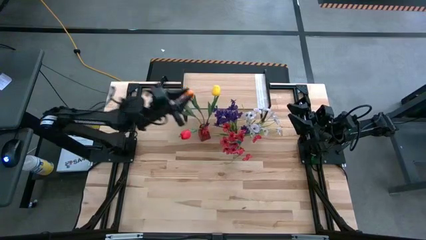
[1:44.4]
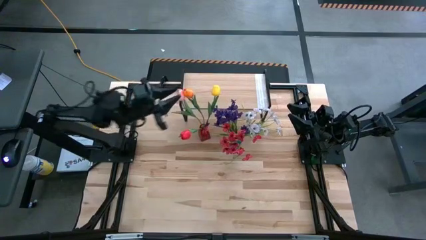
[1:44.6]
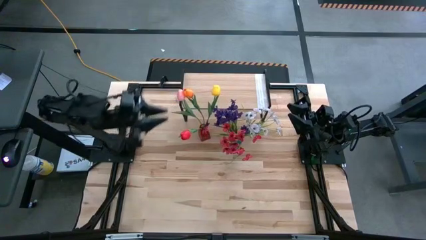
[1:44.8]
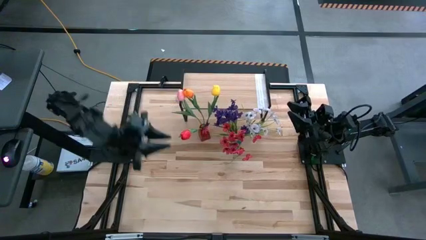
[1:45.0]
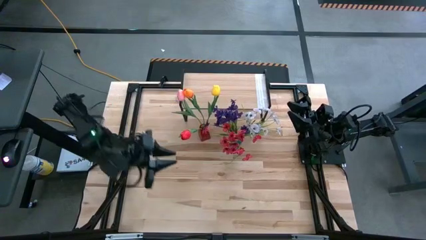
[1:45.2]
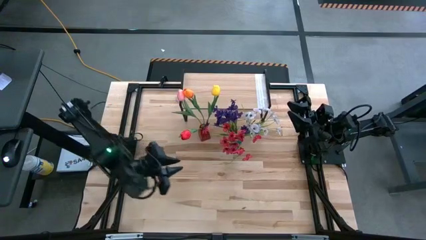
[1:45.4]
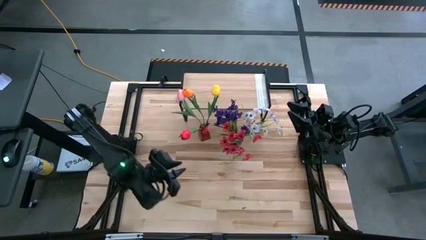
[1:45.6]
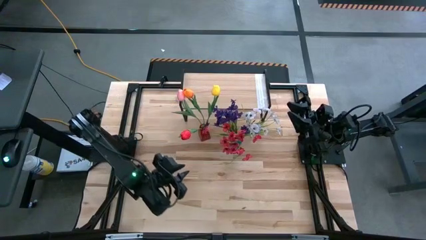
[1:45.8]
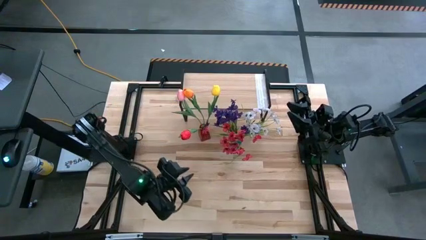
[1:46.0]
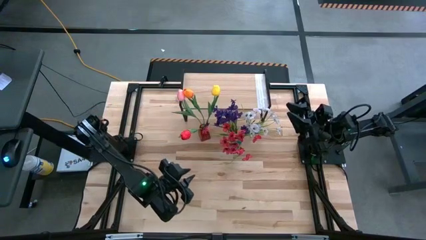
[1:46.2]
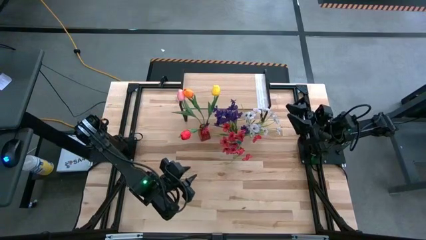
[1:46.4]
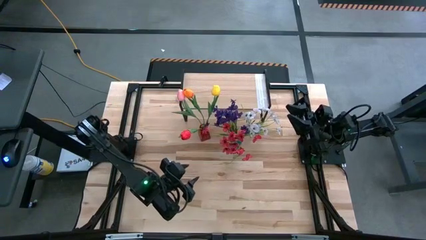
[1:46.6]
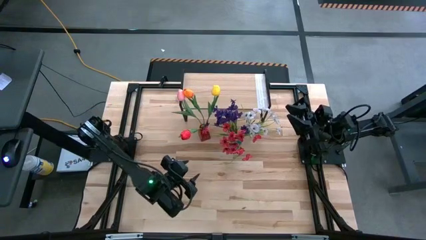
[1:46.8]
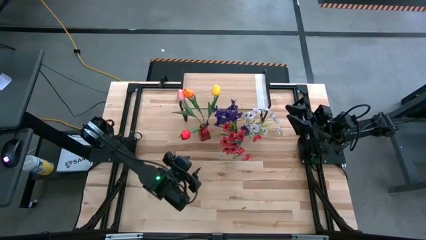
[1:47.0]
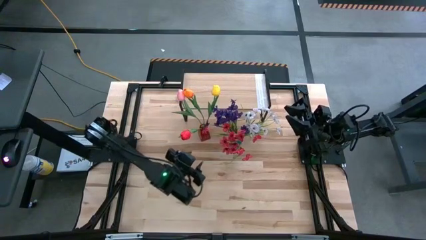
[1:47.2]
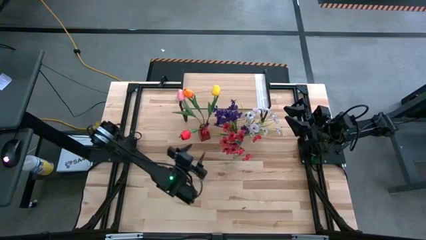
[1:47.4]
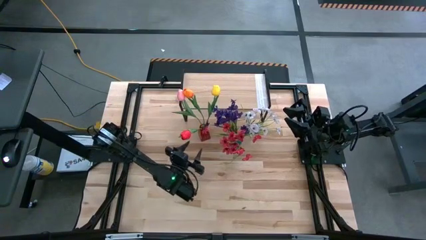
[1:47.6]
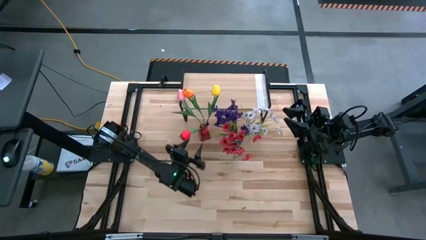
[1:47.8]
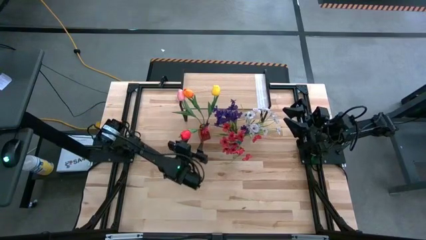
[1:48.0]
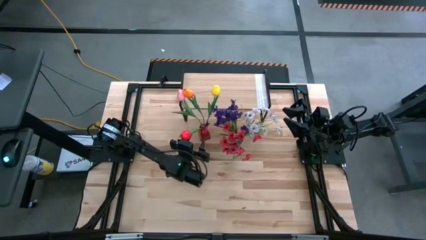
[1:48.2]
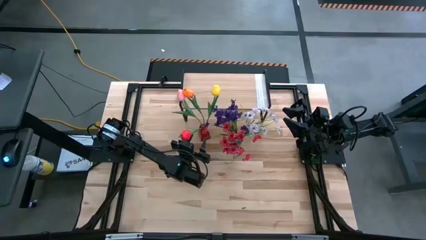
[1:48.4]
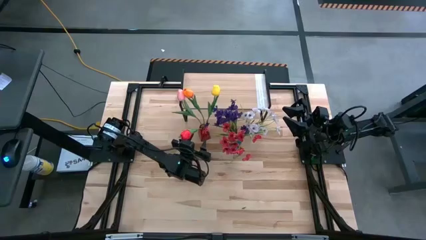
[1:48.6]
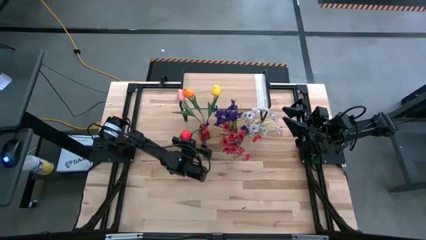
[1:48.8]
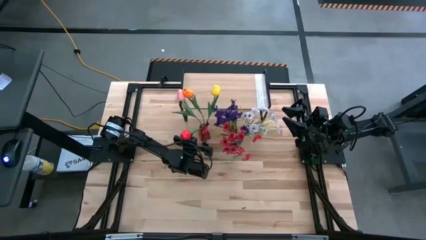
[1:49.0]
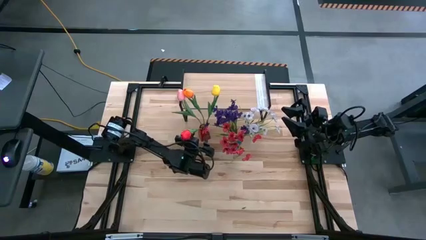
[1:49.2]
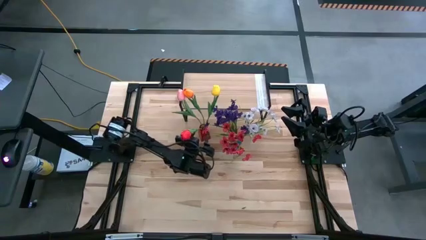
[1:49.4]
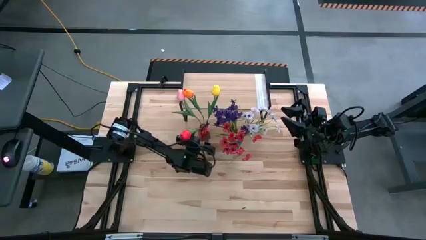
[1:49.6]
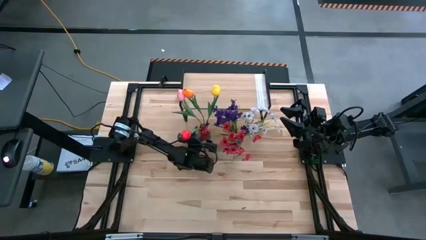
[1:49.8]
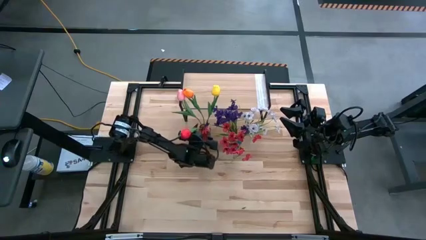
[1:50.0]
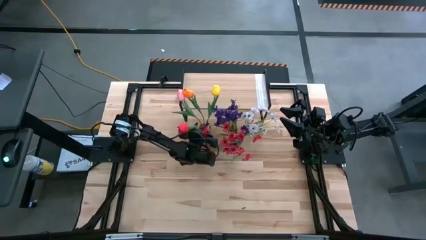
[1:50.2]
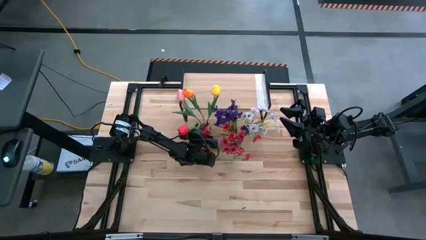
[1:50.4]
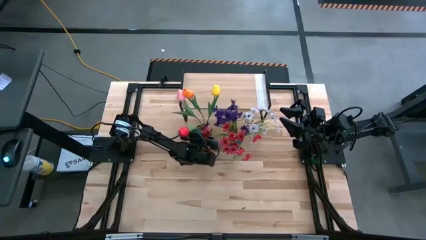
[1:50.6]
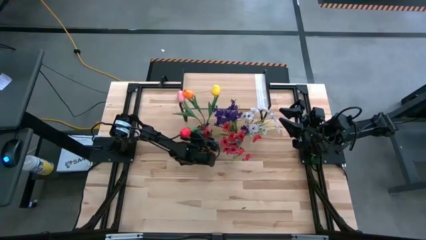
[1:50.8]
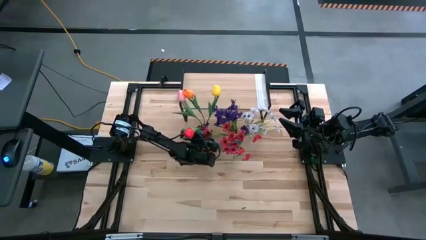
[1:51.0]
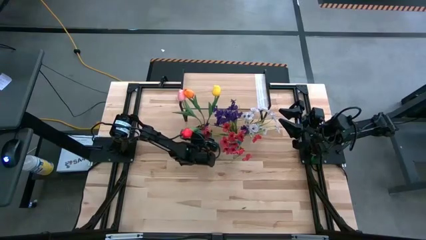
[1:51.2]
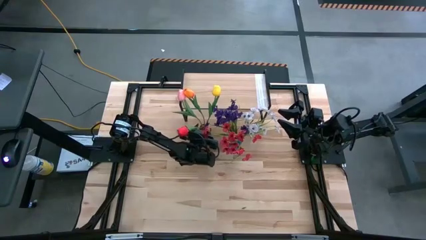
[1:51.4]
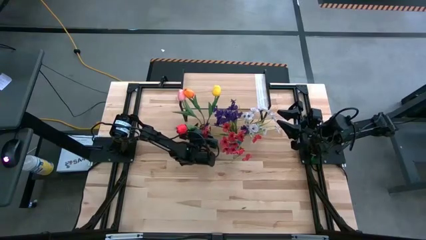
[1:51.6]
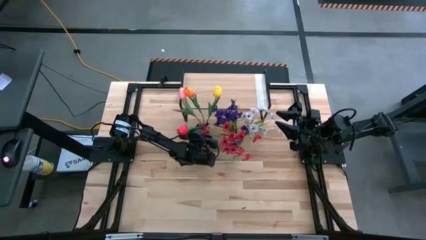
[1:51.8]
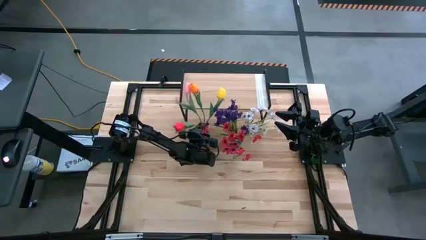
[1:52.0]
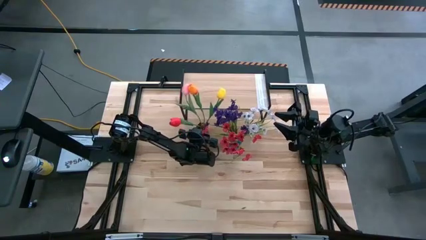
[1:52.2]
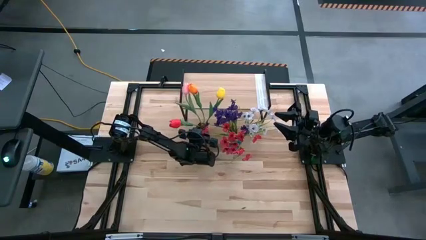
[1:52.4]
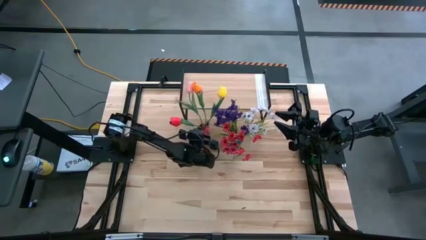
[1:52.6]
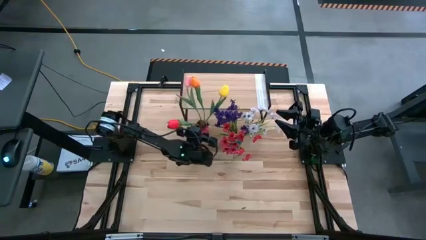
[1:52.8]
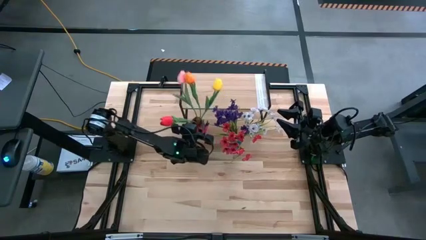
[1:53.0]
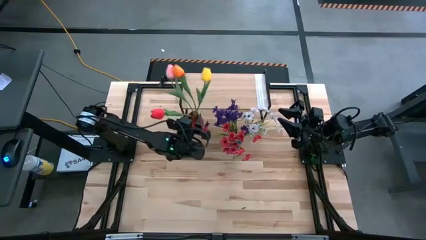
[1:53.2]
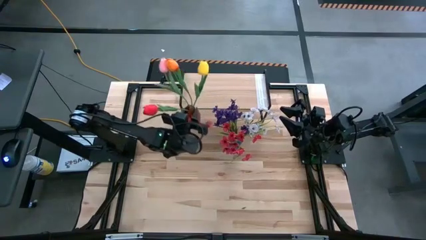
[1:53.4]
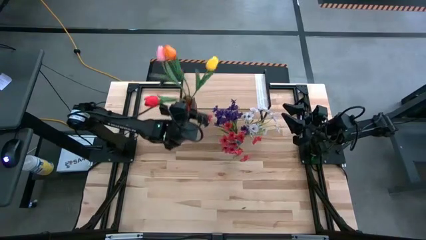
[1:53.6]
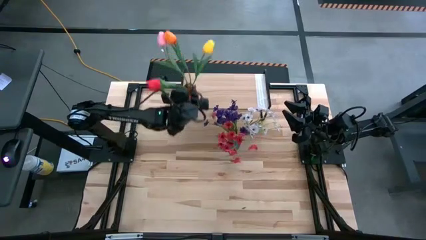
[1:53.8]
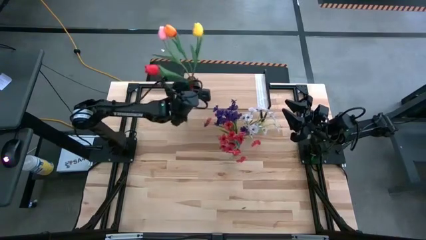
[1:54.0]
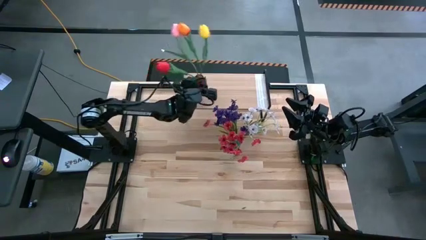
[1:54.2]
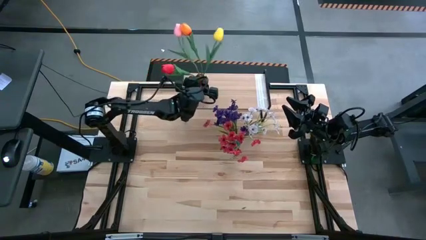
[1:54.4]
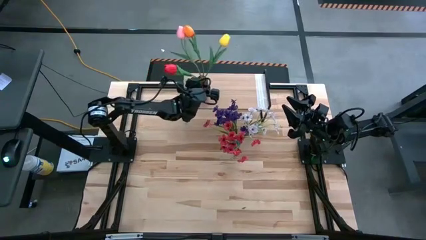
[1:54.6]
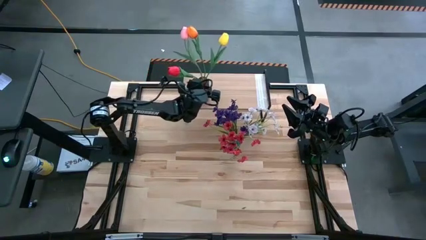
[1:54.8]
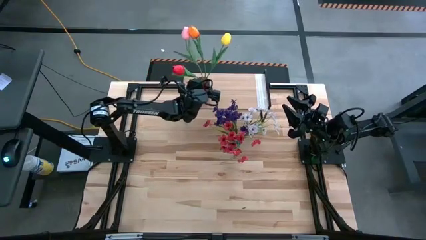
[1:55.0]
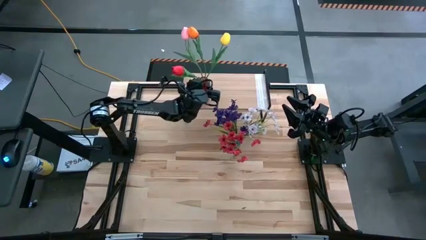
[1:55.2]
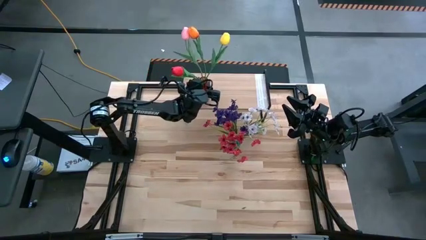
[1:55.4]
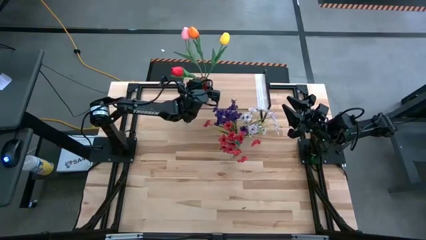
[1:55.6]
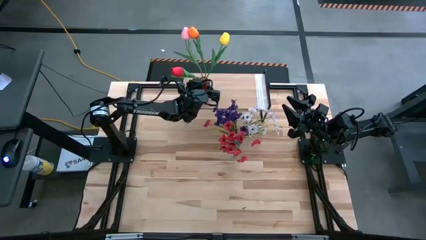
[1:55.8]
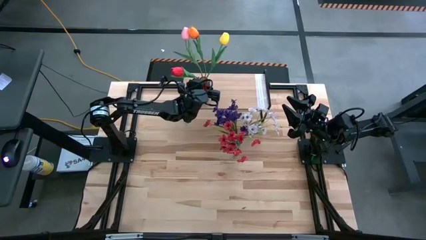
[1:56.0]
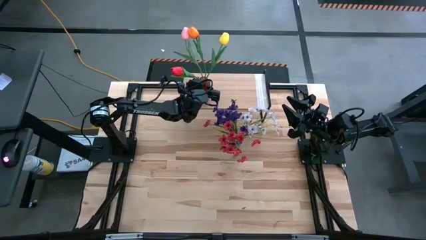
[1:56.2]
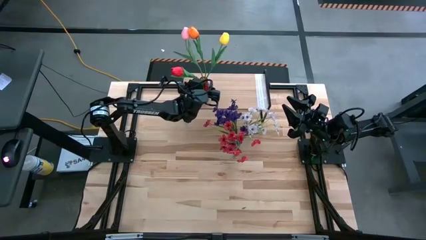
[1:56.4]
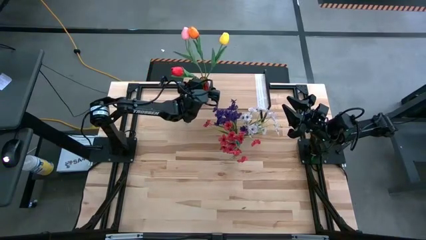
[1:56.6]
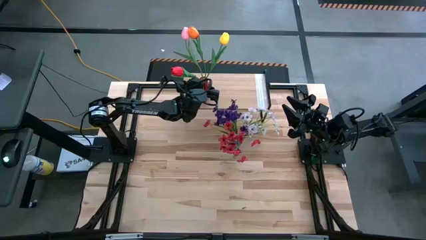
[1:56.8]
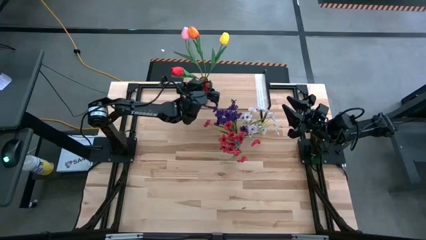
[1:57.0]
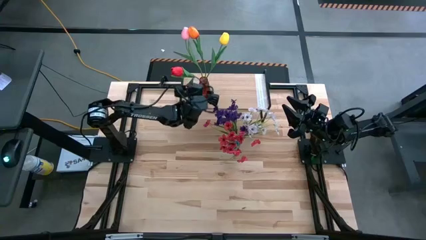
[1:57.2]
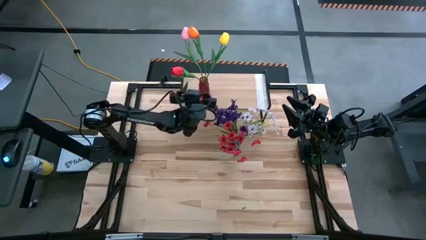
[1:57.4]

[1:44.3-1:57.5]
Task: Pick and place flowers into a vace then onto a shelf
Put the red flower vase on the shelf
